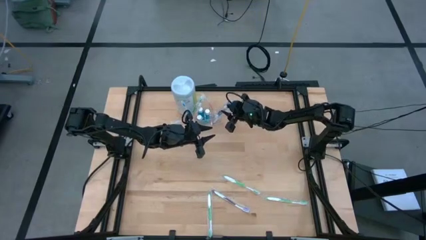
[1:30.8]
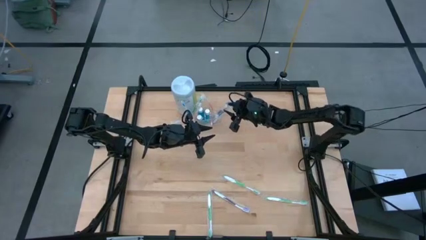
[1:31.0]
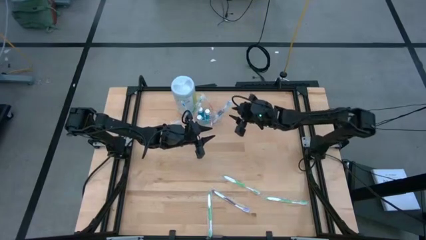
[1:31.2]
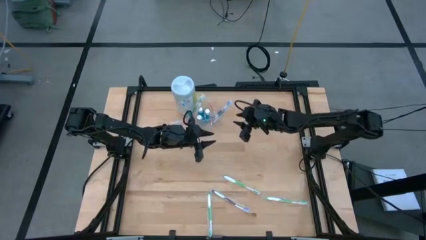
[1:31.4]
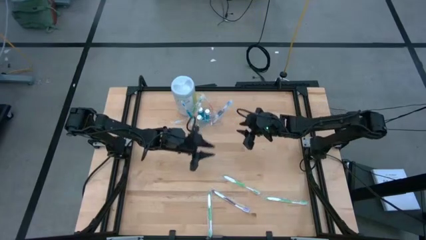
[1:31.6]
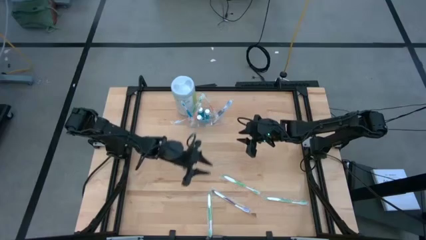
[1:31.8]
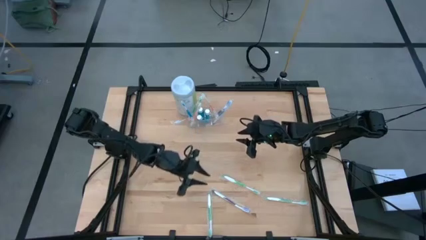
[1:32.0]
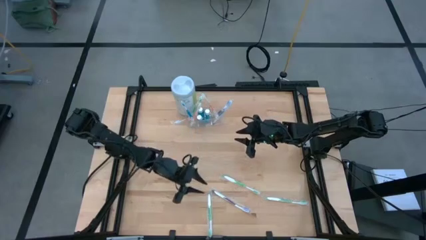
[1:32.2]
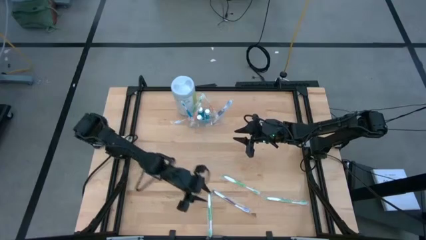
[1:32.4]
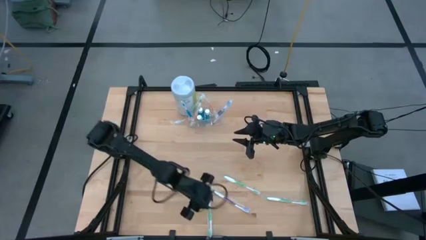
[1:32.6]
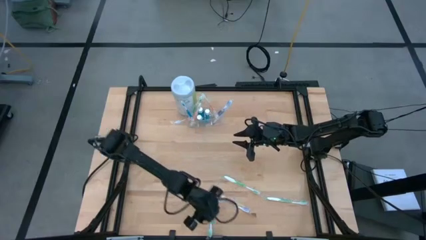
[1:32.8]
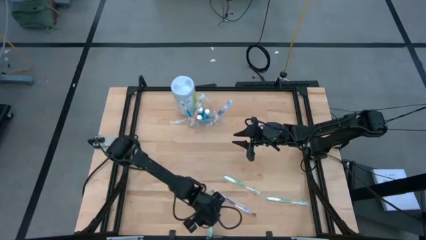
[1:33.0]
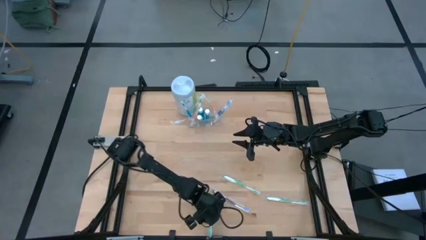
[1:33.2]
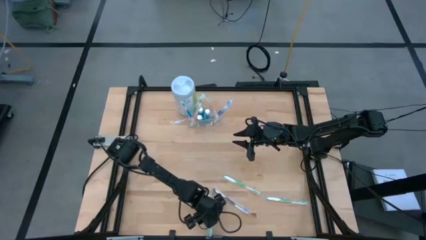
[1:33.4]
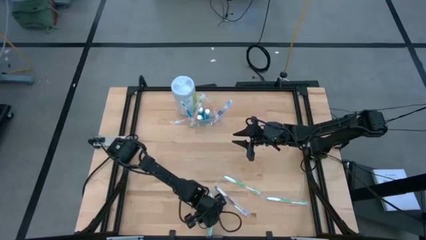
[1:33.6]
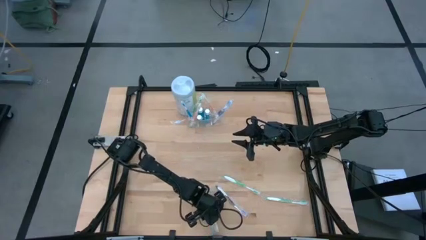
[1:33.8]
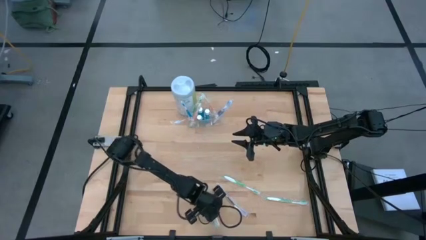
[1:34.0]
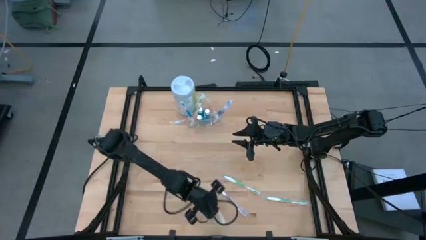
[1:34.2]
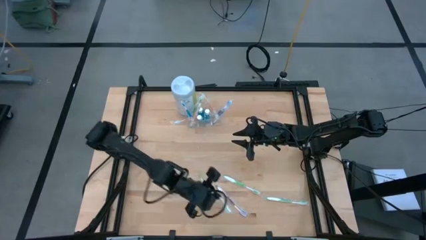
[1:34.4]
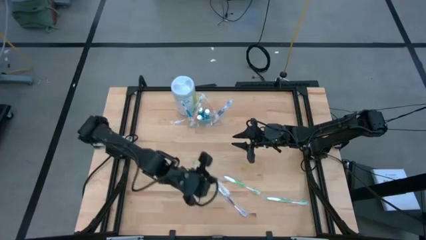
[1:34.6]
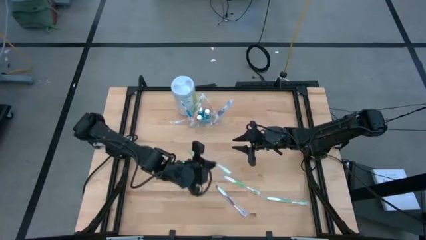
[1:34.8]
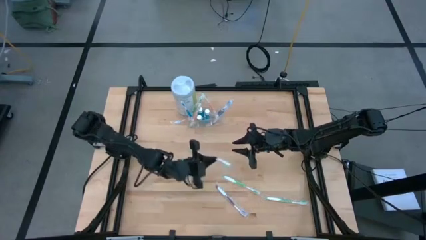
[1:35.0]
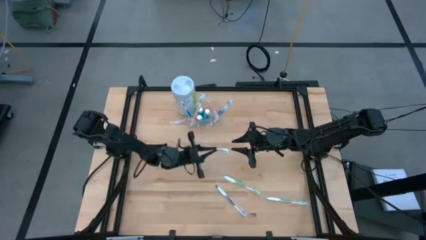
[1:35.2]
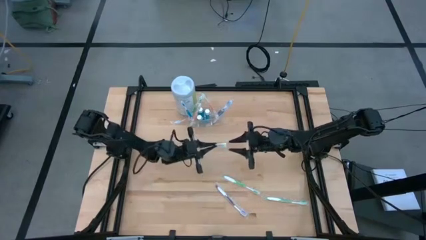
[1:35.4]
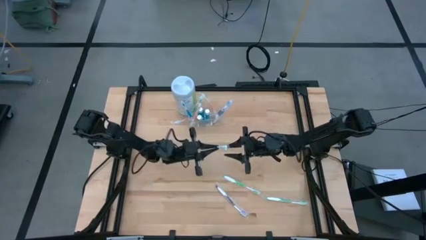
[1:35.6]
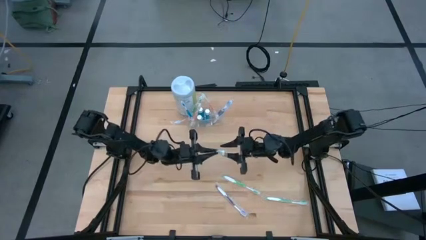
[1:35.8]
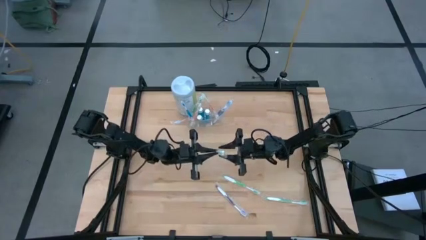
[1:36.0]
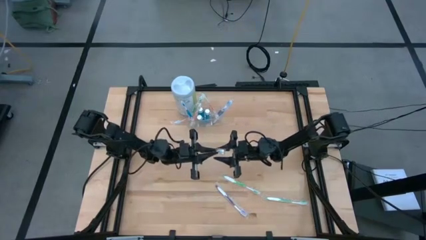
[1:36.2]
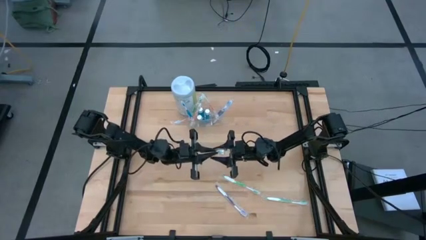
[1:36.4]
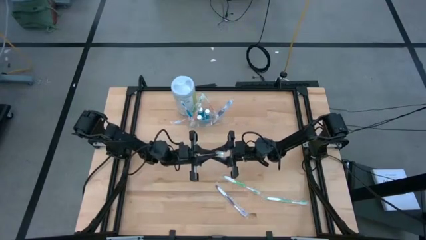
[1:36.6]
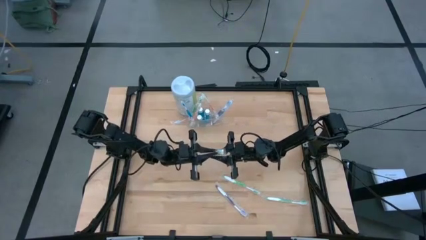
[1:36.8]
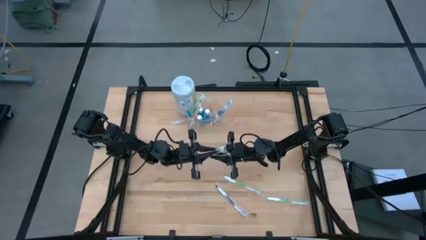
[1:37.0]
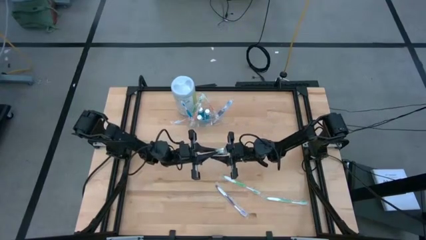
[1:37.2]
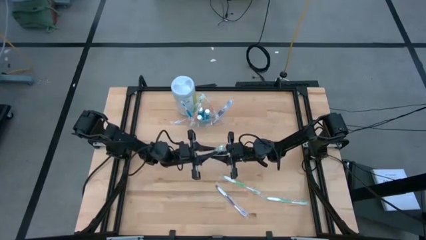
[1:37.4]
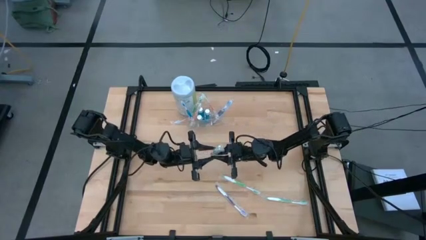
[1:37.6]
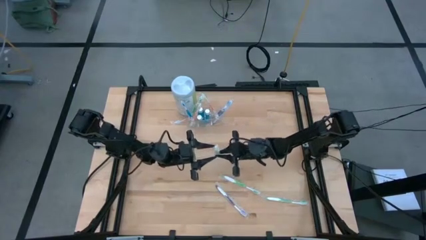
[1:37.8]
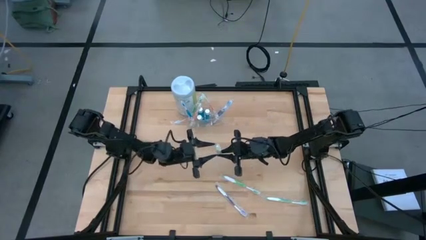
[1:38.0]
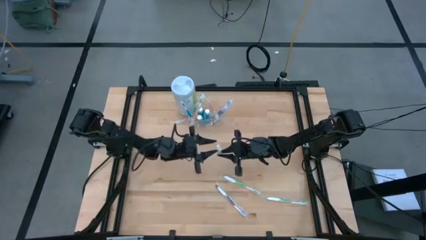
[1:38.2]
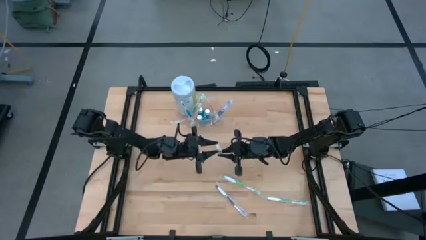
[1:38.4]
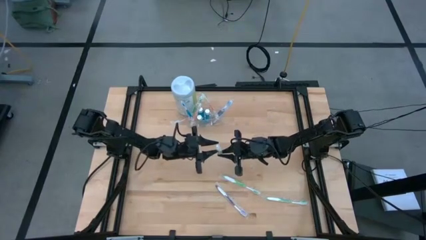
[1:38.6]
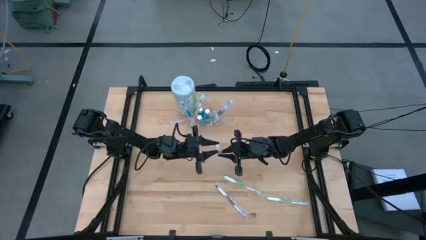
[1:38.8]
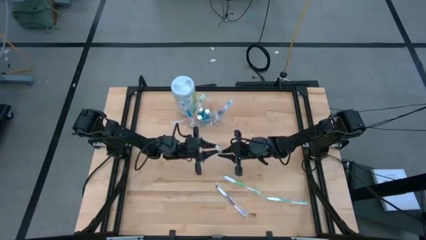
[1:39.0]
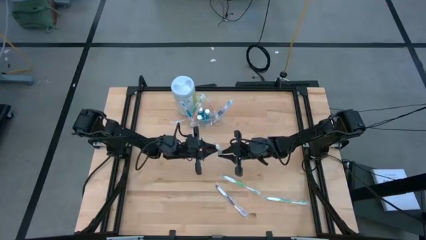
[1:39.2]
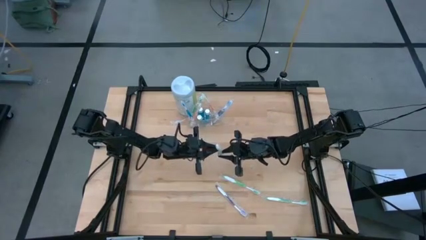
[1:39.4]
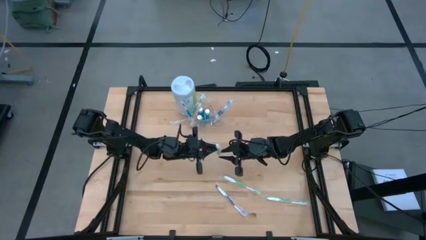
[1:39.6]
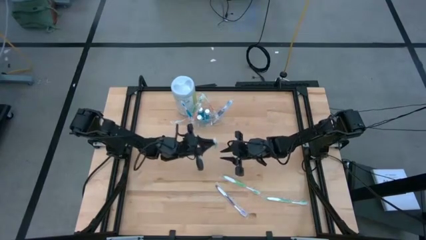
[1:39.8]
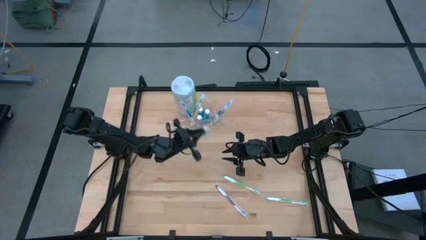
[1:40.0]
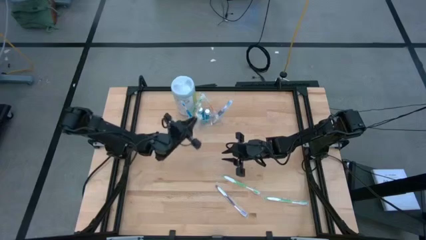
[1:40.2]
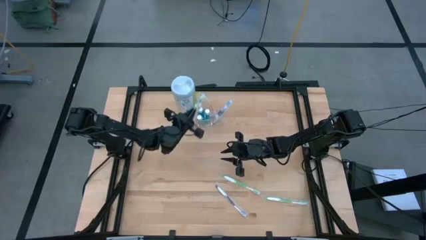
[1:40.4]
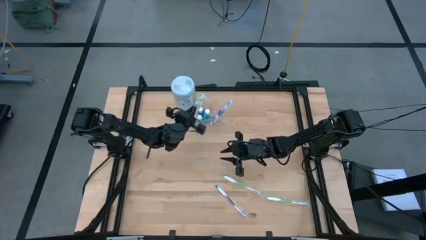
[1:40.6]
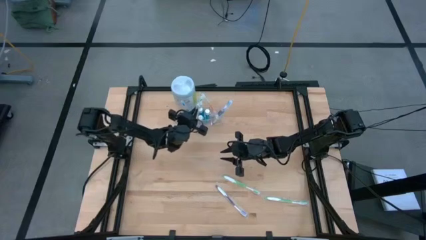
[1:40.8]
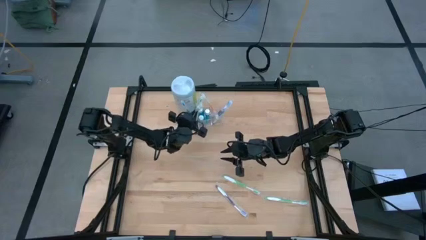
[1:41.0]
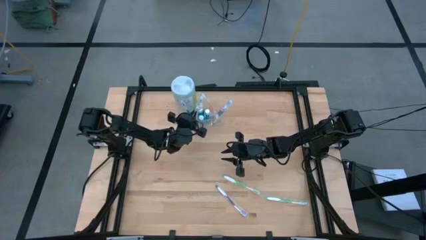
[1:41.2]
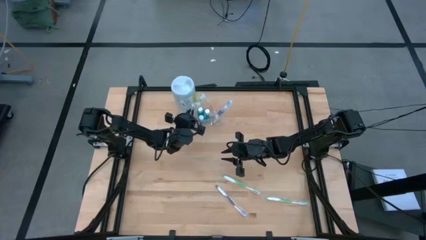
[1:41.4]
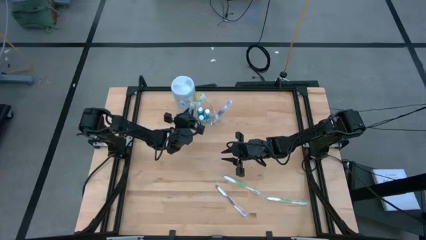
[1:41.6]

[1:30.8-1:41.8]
Task: Pick & Place toothbrushing station
Put the green toothbrush into the transparent organizer
